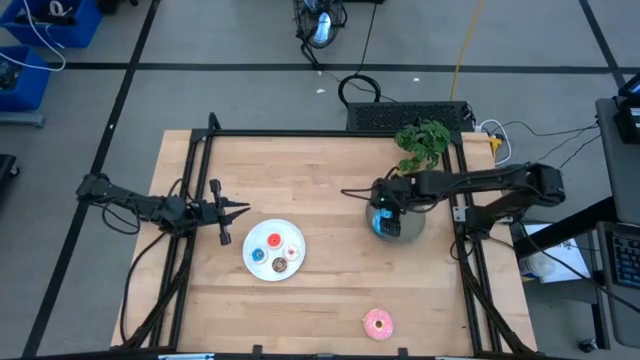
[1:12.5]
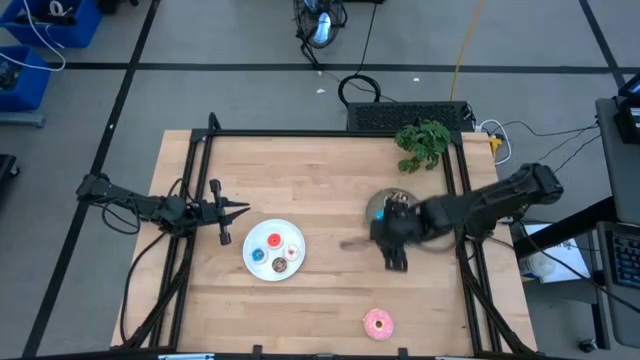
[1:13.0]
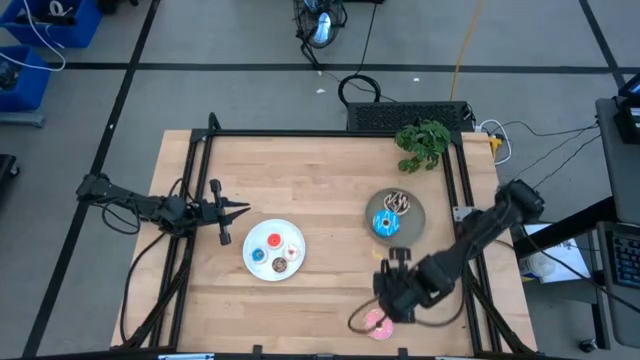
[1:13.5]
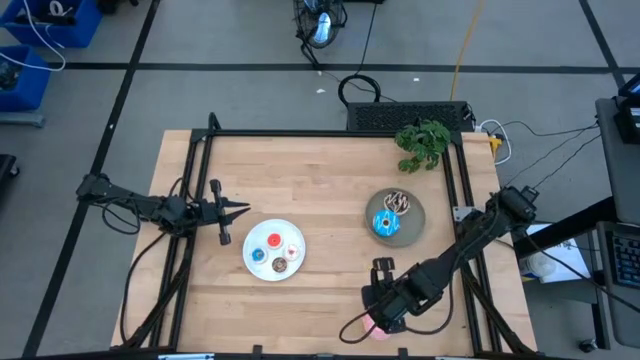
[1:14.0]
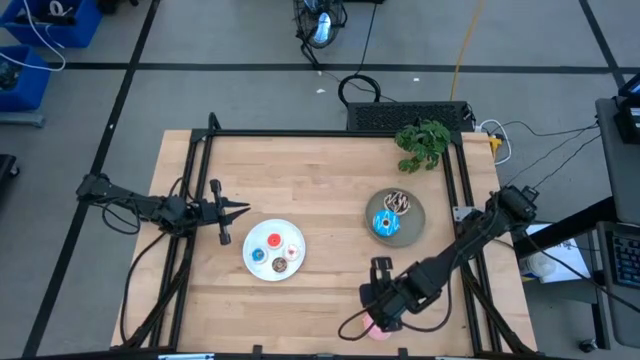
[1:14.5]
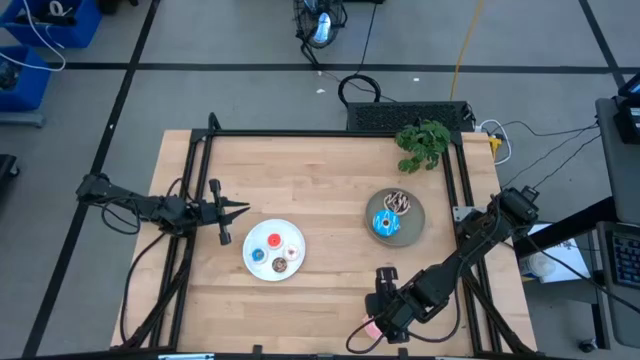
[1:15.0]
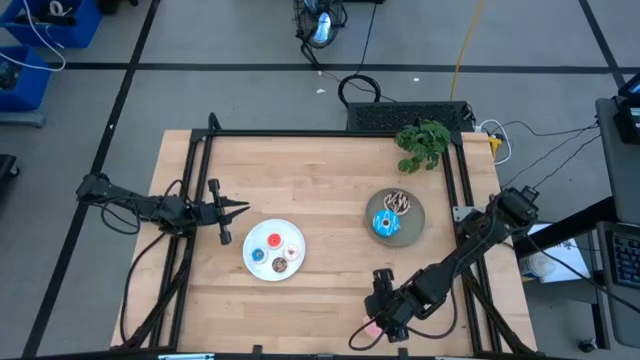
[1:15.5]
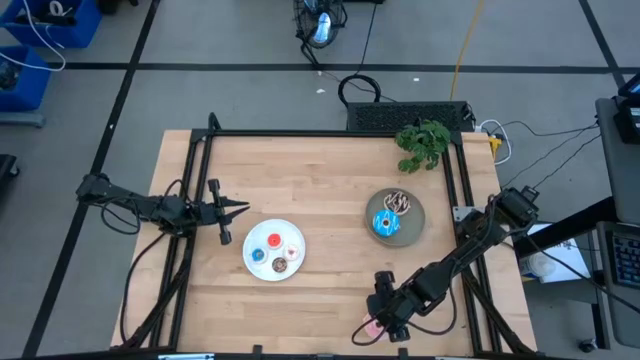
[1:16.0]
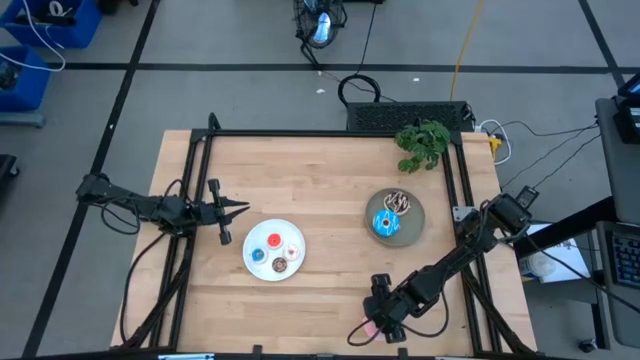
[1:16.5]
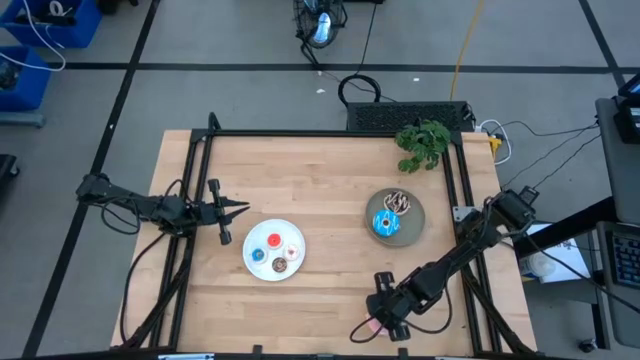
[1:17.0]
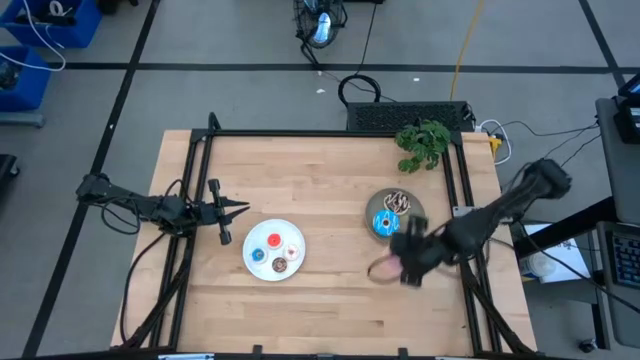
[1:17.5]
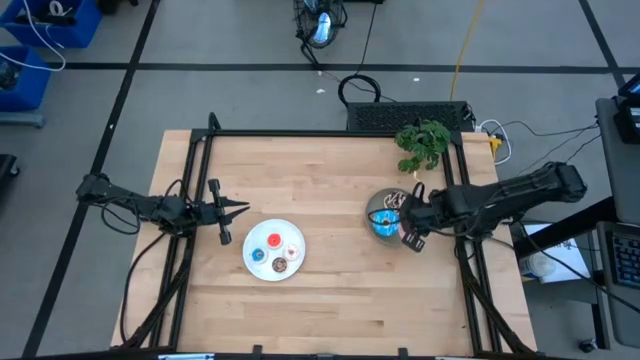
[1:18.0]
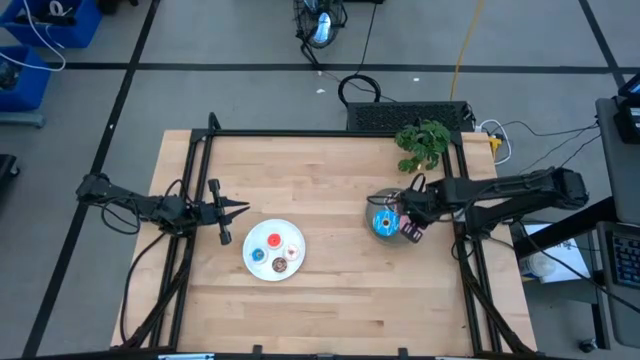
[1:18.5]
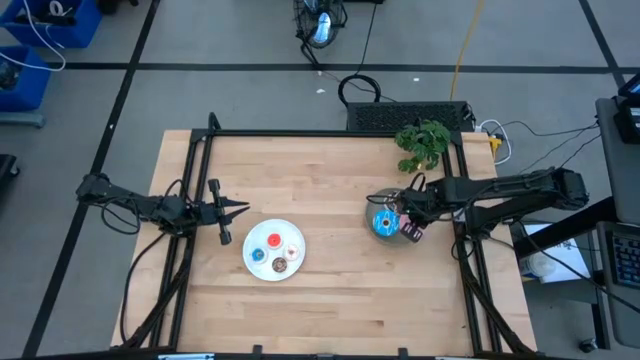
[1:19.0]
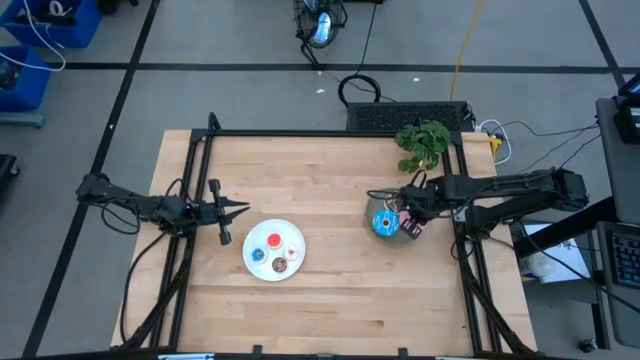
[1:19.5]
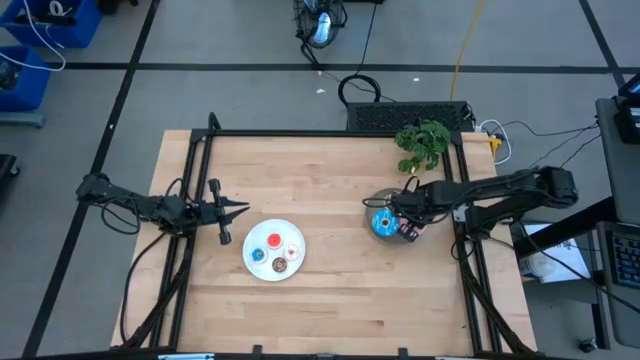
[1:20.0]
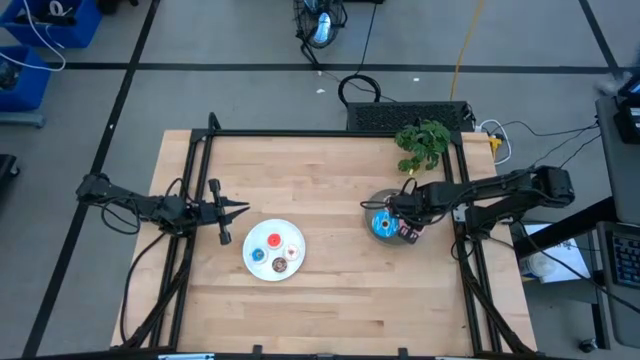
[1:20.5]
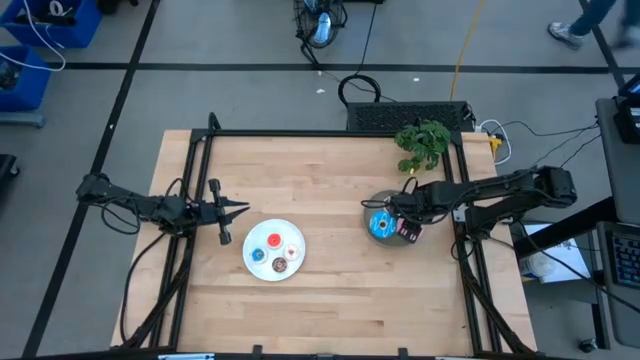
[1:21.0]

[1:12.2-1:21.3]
Task: Pick & Place donuts
Put the big pink donut on the gray plate

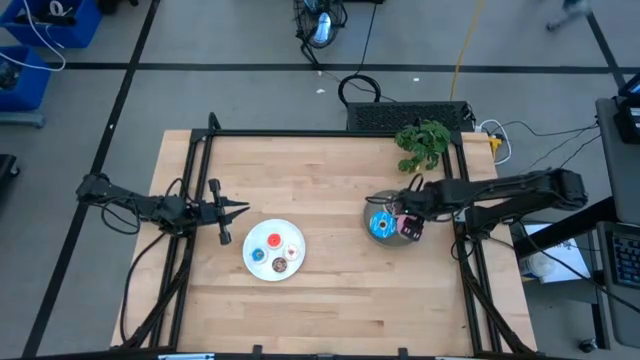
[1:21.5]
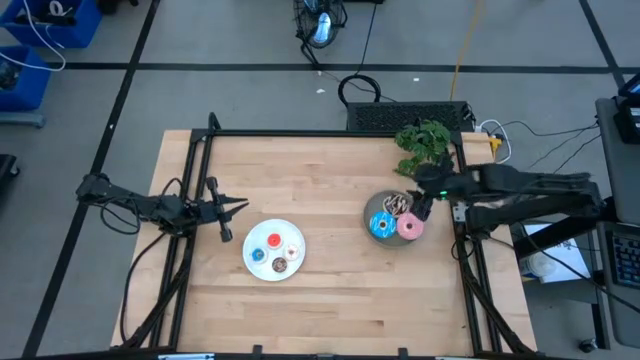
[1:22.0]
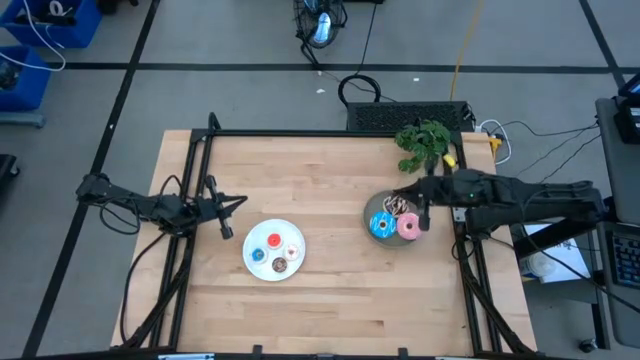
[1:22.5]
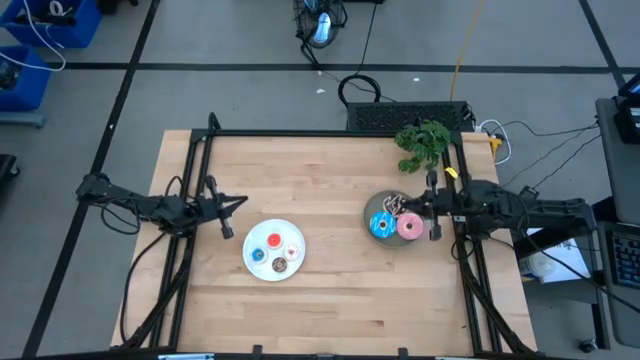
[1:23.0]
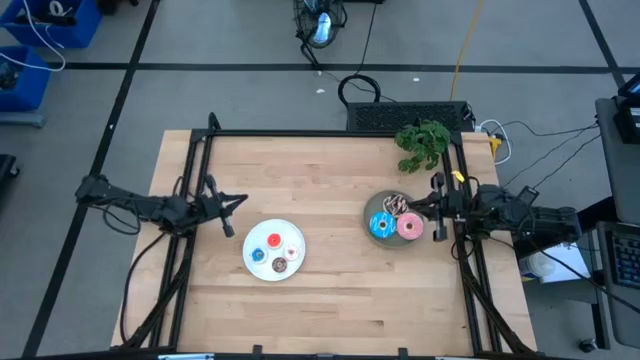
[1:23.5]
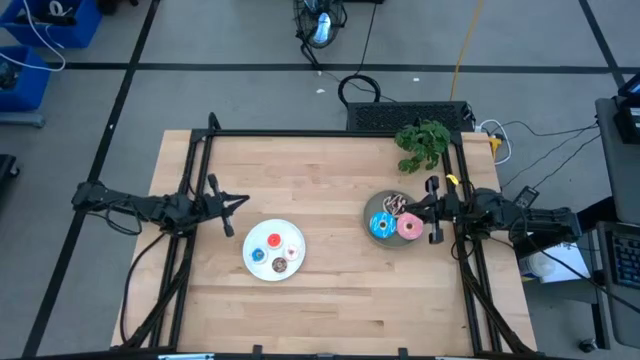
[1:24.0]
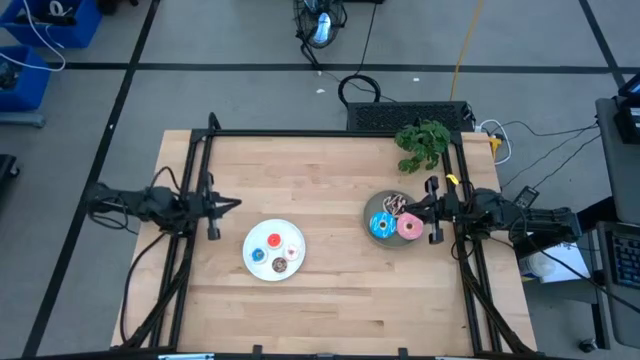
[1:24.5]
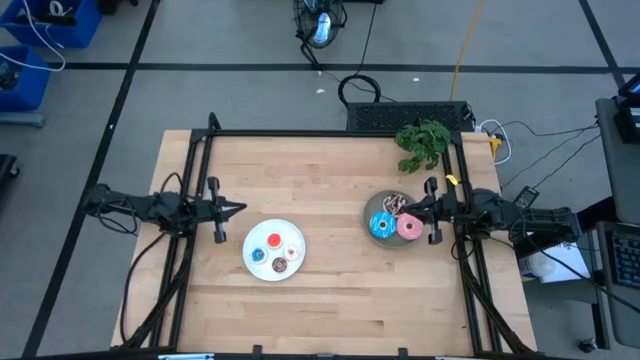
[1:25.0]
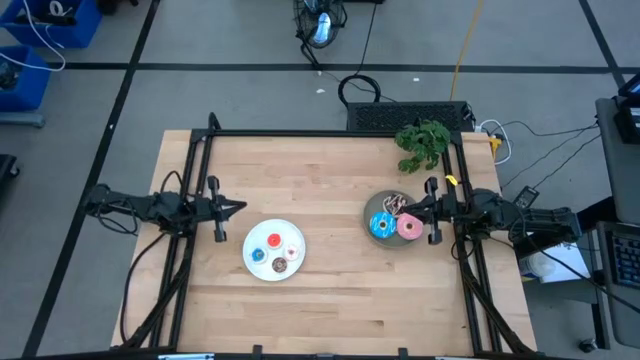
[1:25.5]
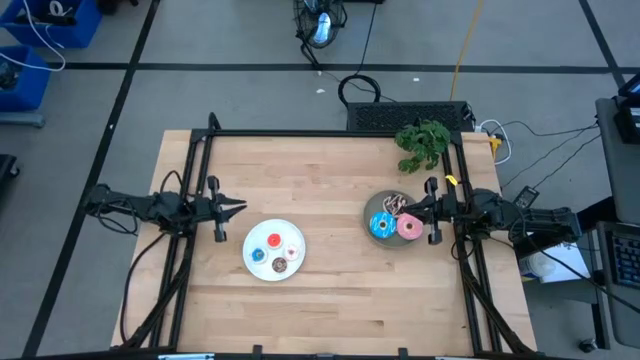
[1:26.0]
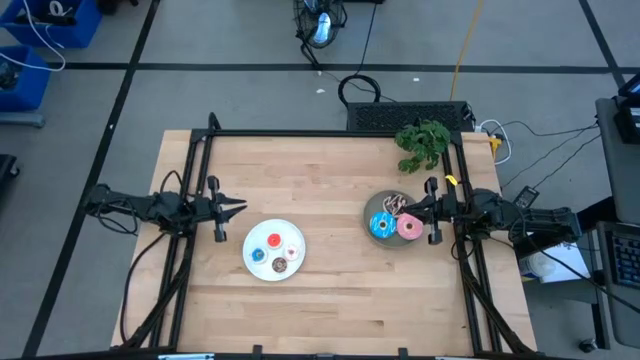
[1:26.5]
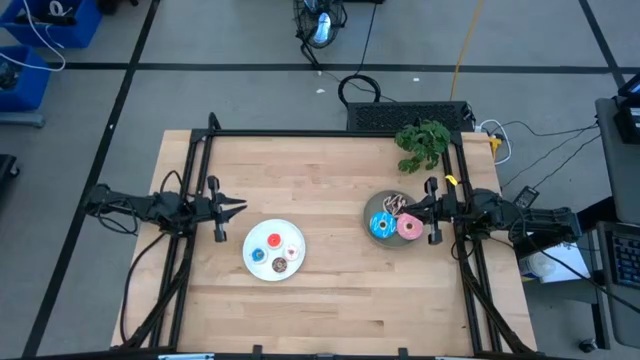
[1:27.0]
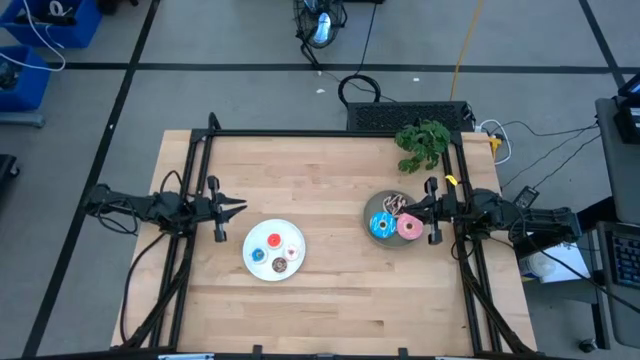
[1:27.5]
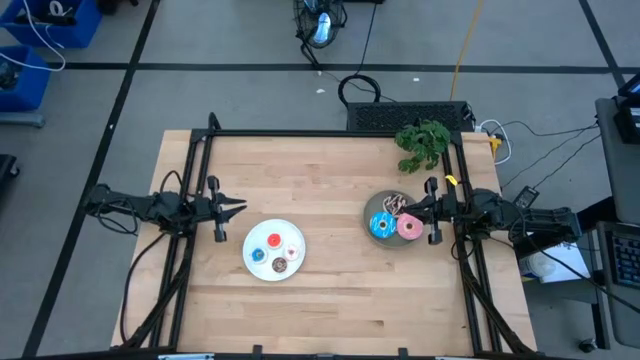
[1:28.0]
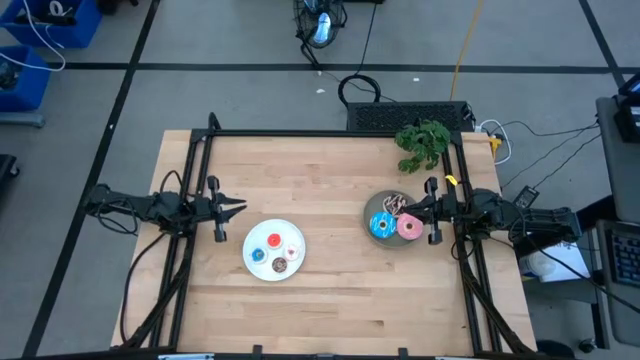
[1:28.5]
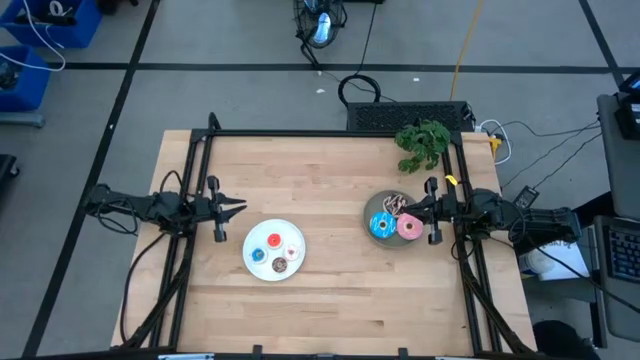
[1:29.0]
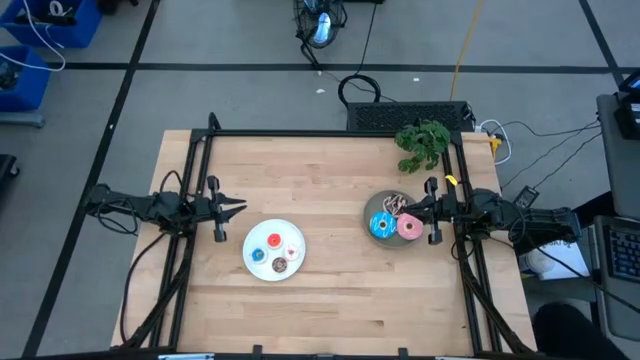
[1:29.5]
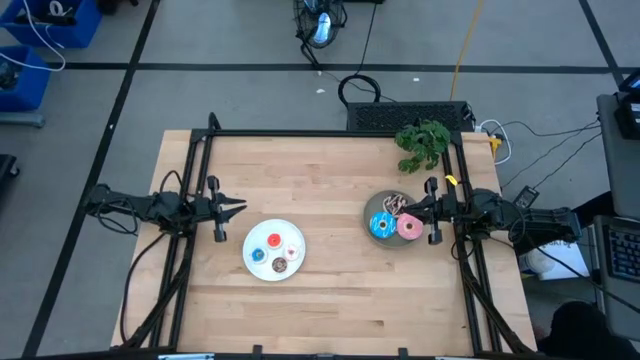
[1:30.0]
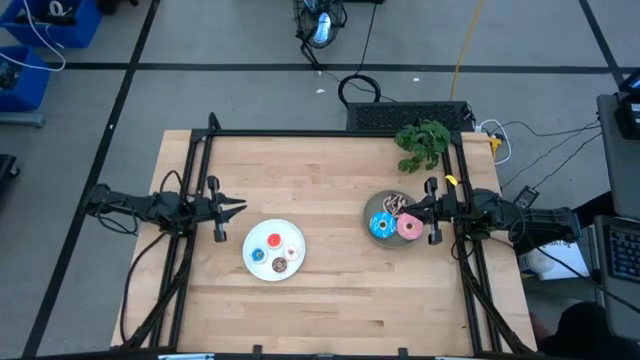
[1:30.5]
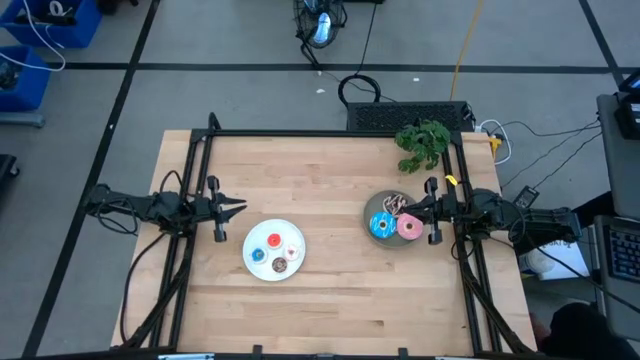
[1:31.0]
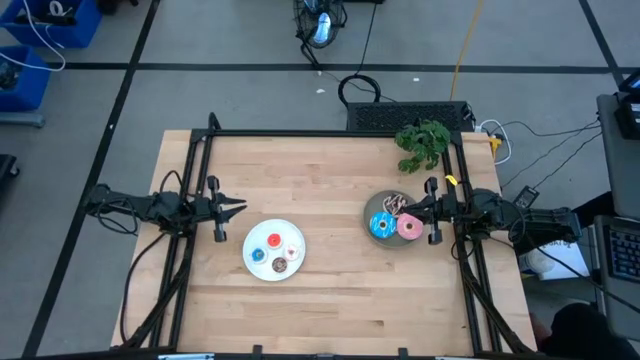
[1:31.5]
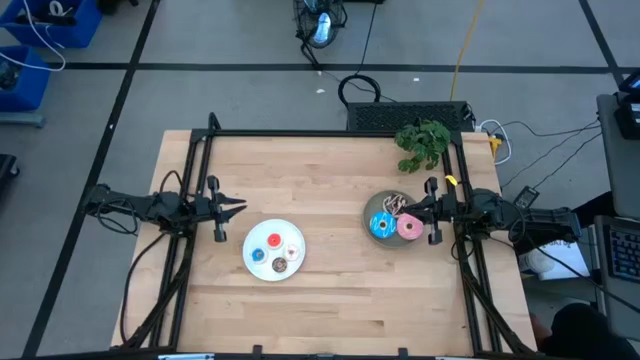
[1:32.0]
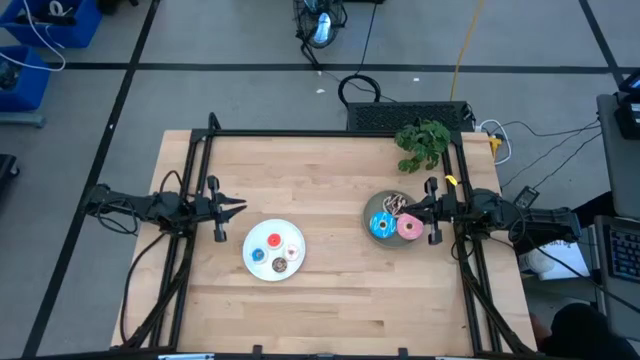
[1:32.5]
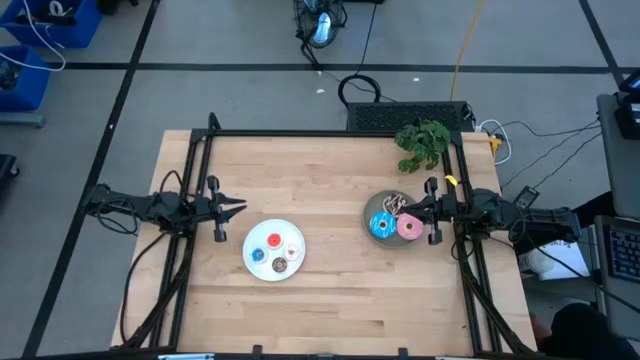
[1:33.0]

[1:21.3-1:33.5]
Return to Home Position
